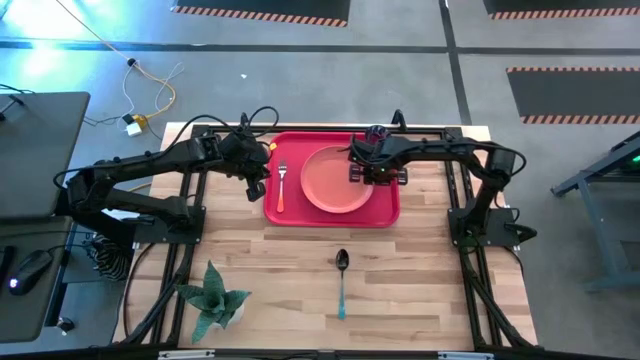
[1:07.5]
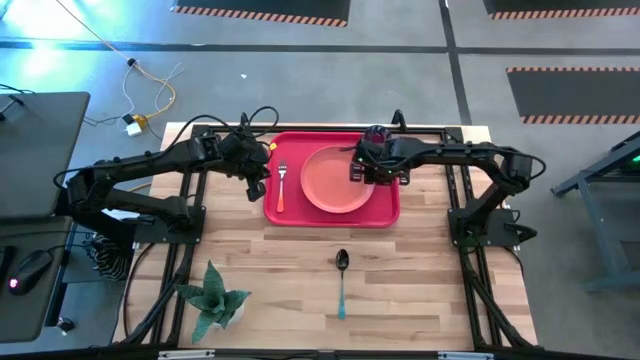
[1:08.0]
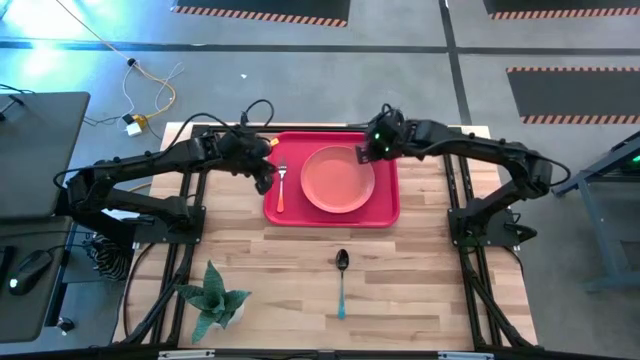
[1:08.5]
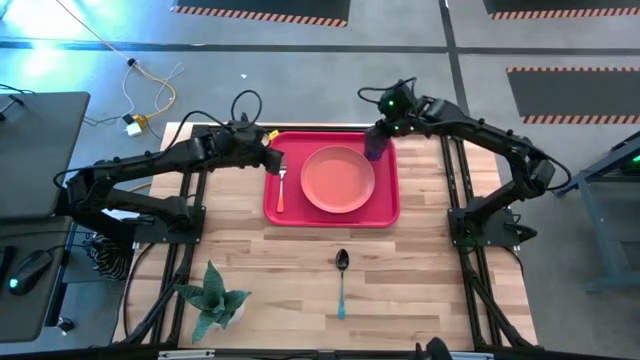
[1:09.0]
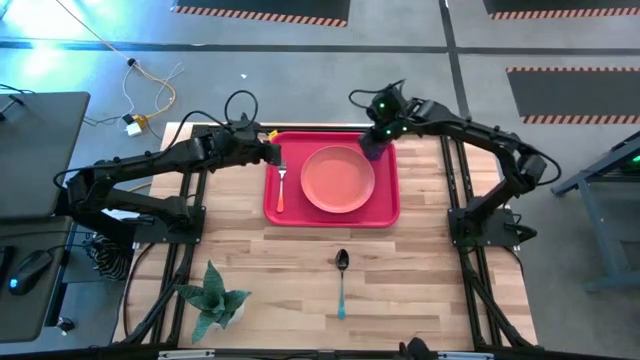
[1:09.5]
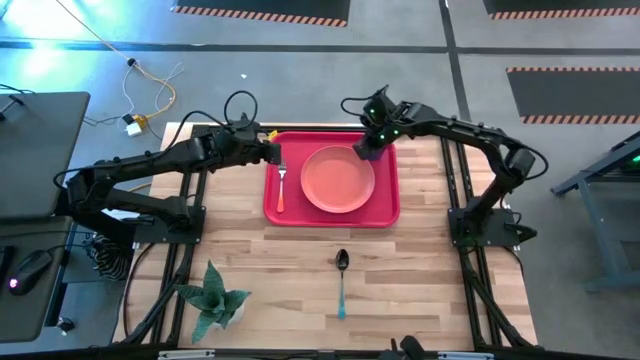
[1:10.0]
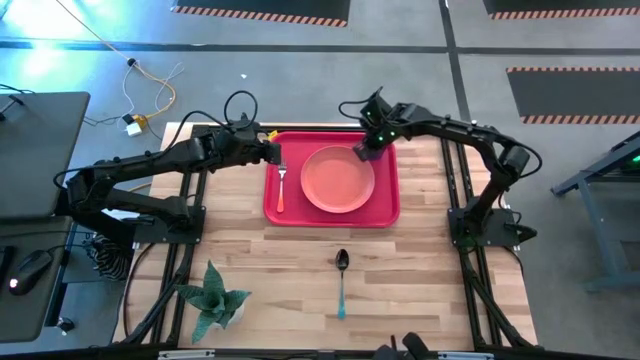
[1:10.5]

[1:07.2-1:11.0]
Task: Pick and place plate/cup/fork/spoon on tray
Adjust the blue glass on the red serving tray

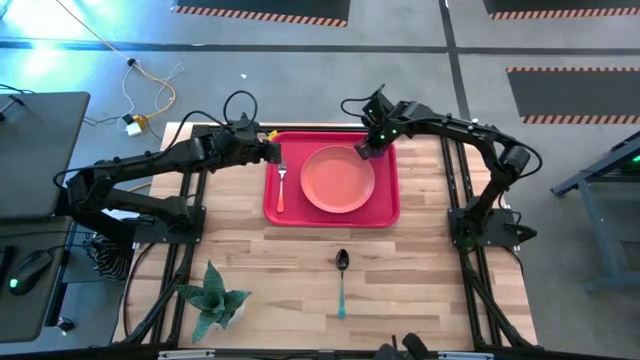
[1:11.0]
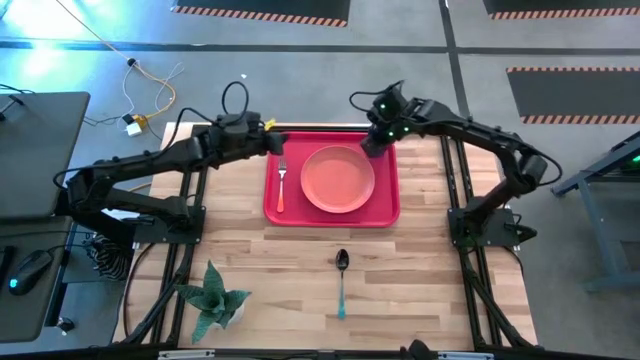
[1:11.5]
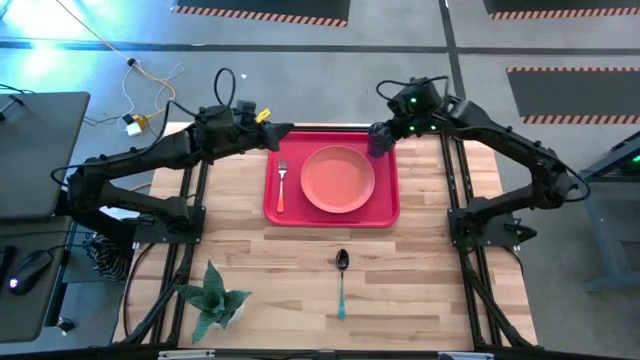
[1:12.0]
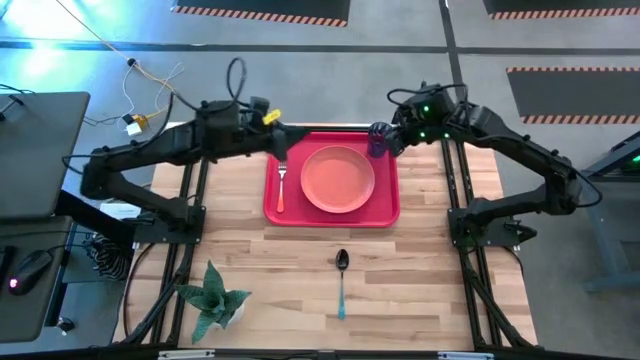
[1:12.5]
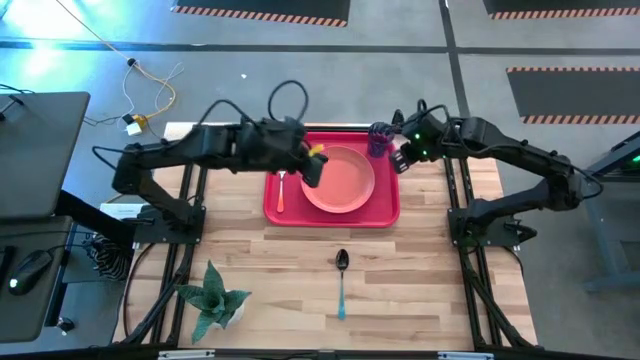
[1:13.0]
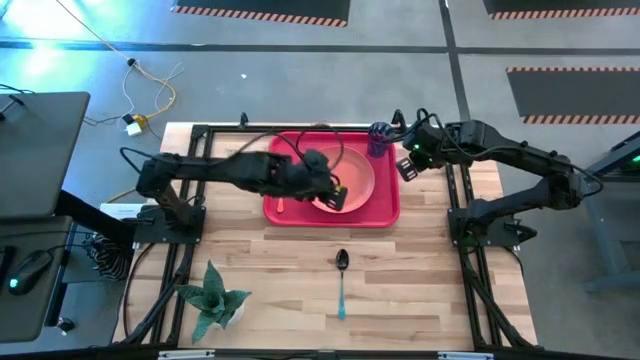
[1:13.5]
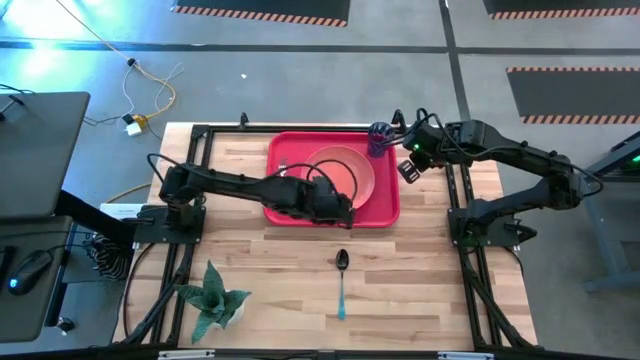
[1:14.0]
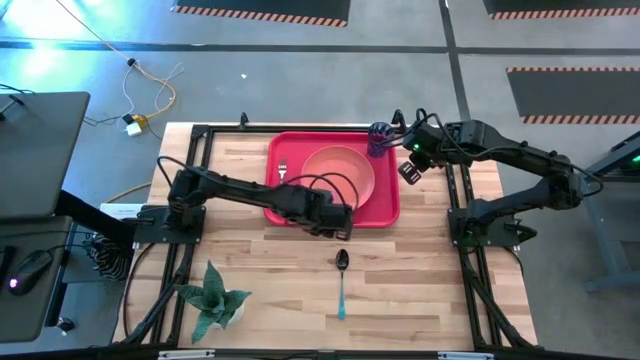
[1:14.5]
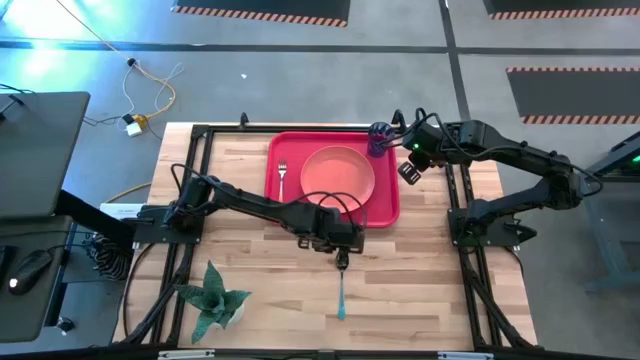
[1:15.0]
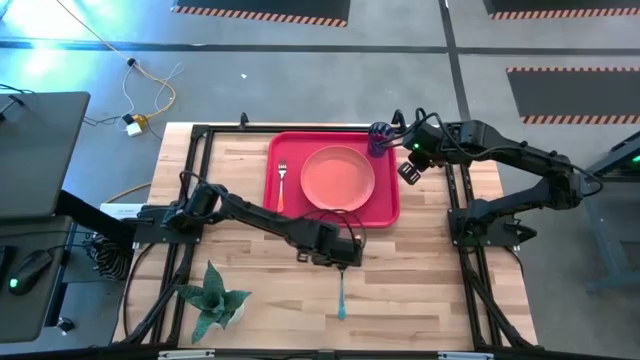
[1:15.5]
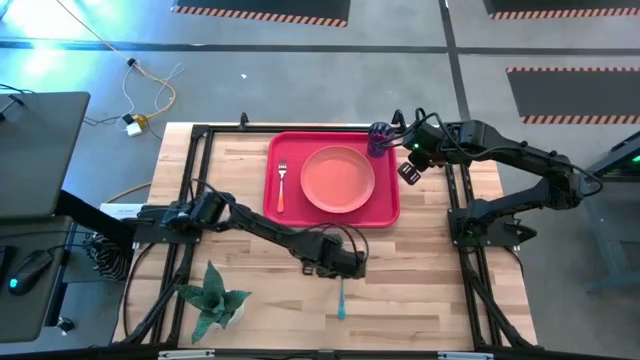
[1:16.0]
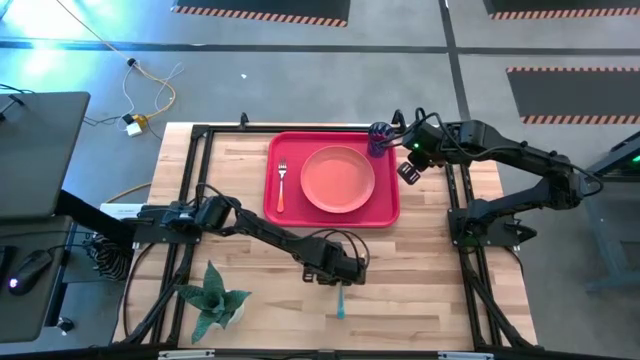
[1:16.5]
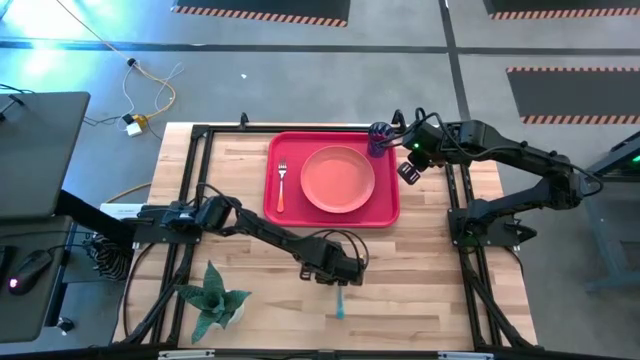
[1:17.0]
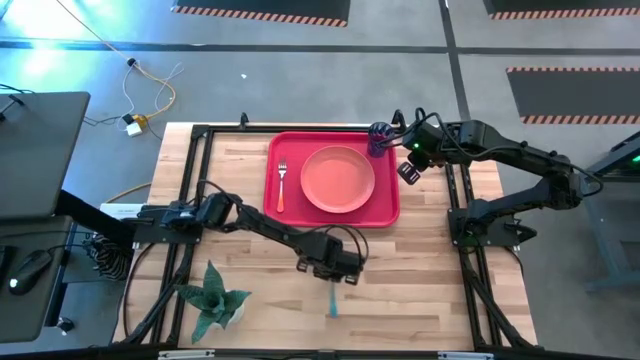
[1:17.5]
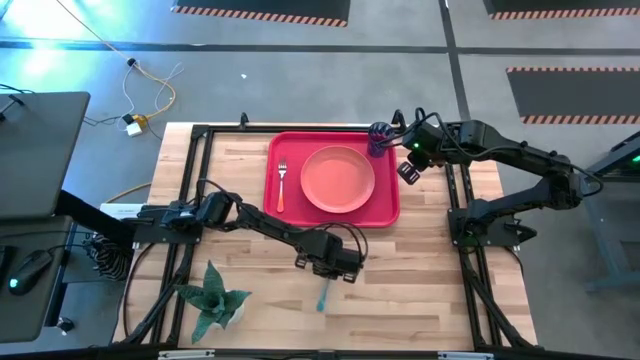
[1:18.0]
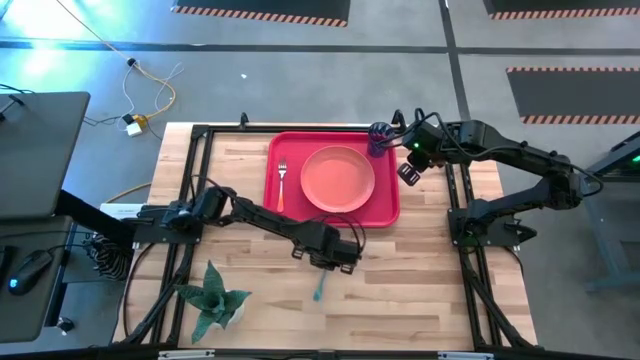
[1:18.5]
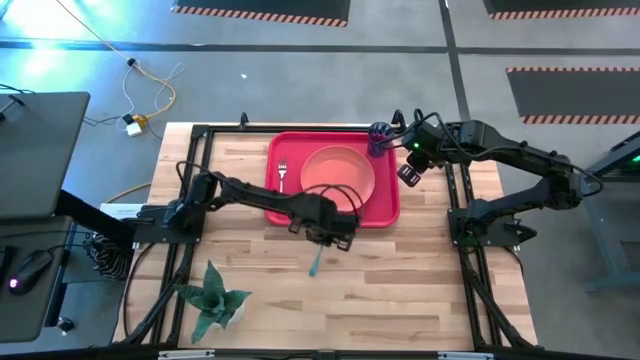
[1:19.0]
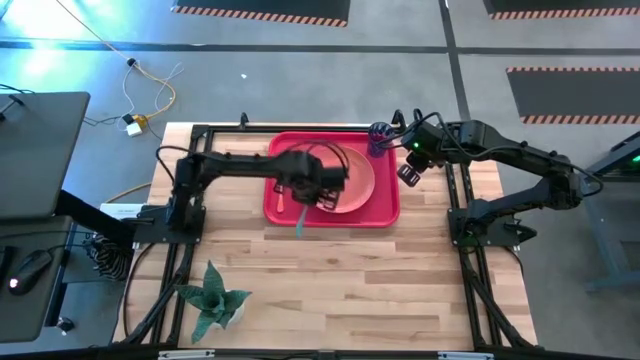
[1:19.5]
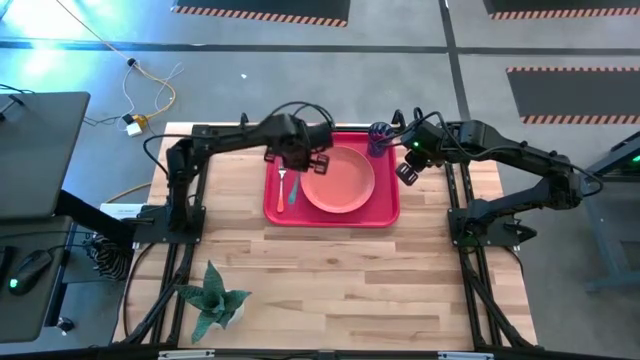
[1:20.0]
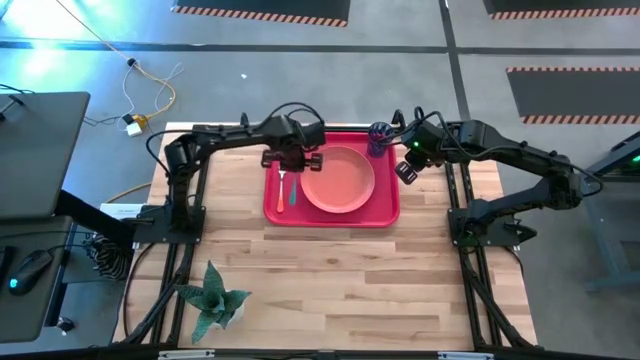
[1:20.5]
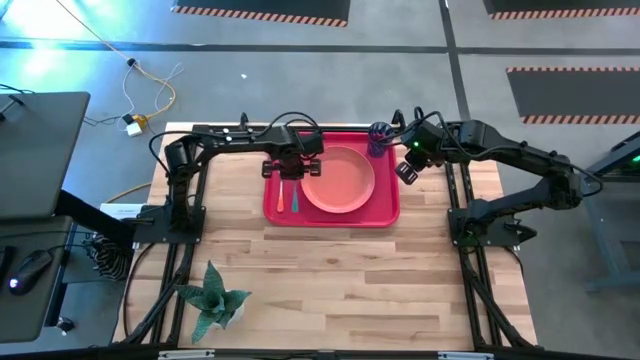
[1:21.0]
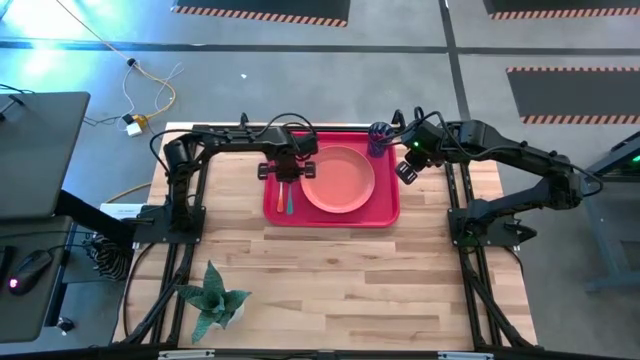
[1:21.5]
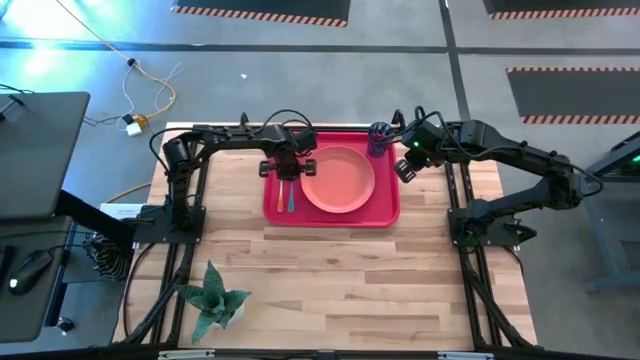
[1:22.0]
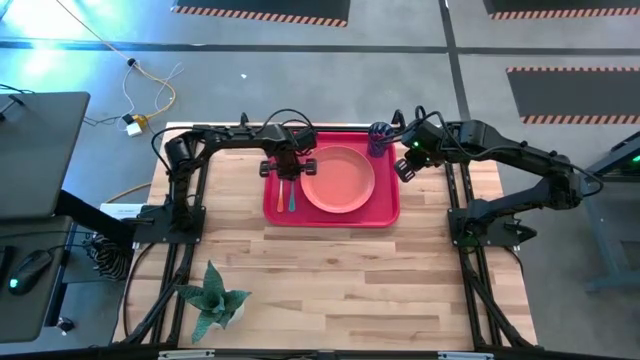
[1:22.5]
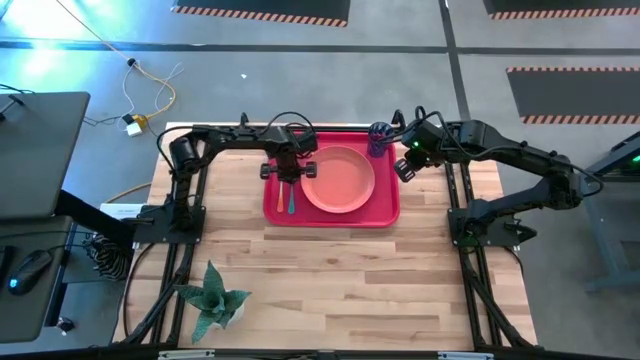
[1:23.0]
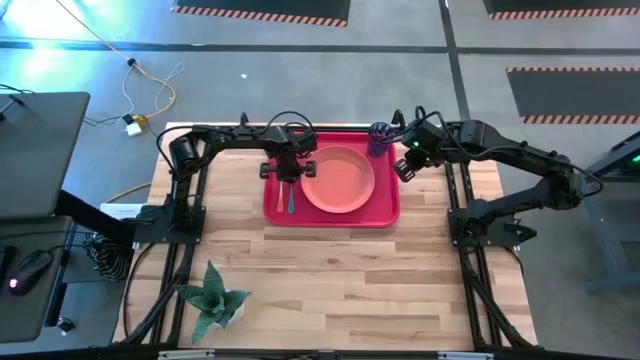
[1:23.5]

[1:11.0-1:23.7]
Put the blue spoon on the red serving tray to the left of the orange plate

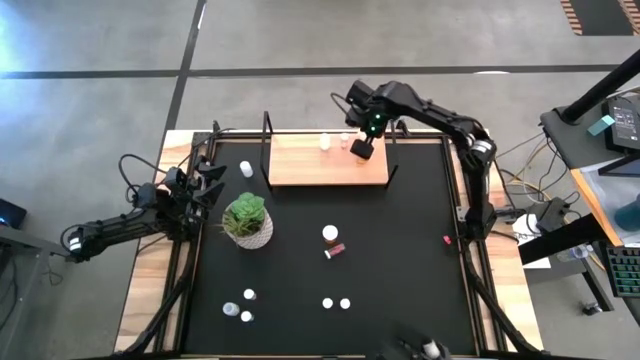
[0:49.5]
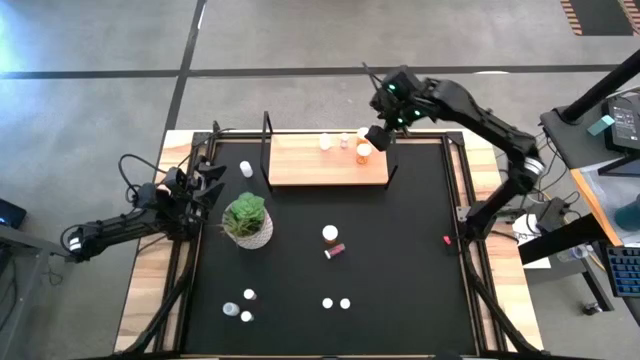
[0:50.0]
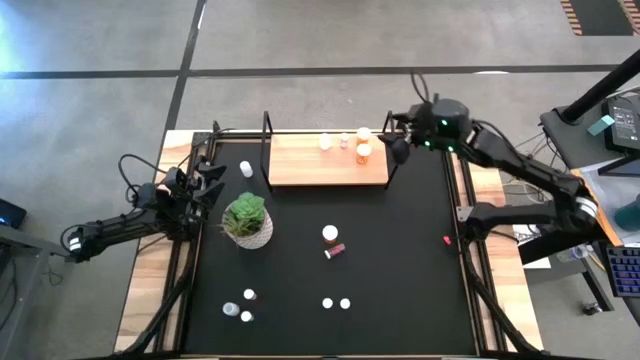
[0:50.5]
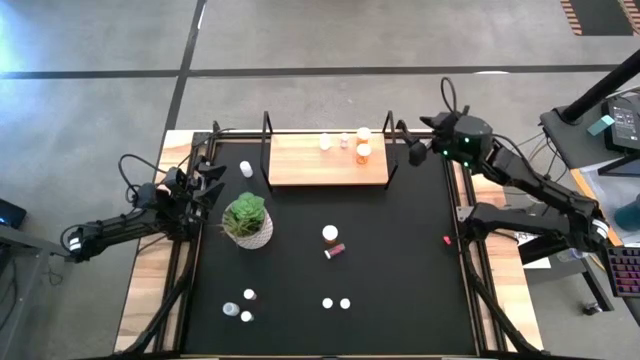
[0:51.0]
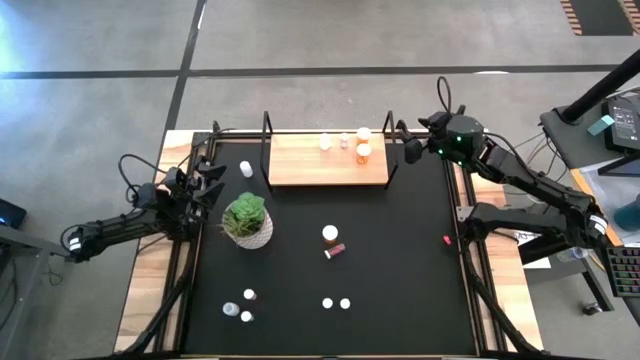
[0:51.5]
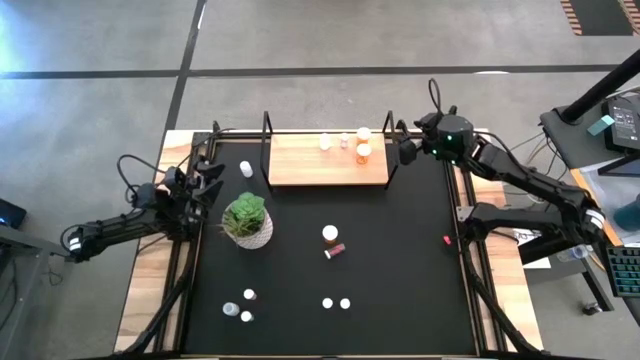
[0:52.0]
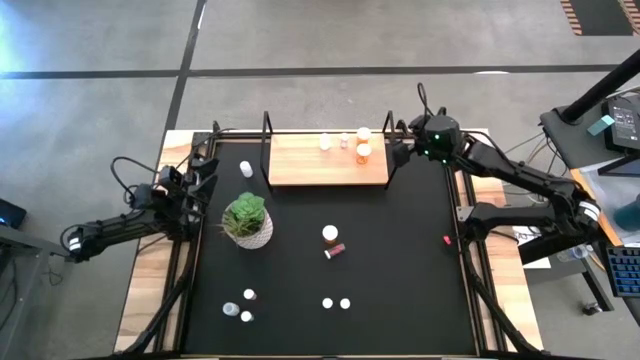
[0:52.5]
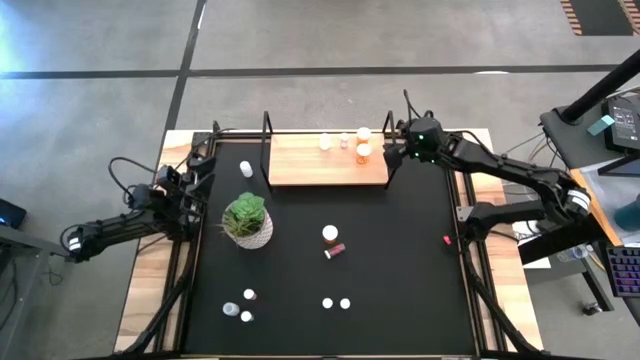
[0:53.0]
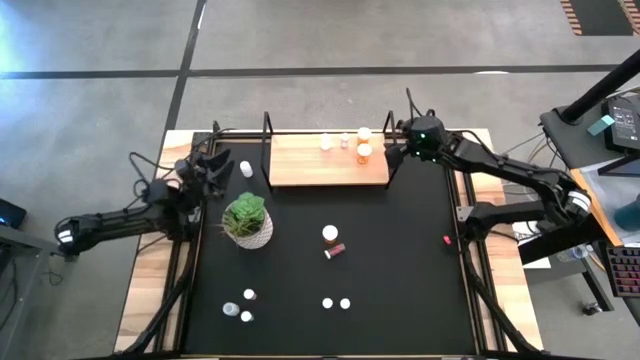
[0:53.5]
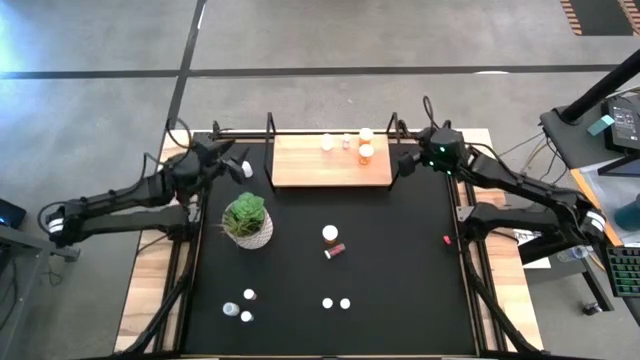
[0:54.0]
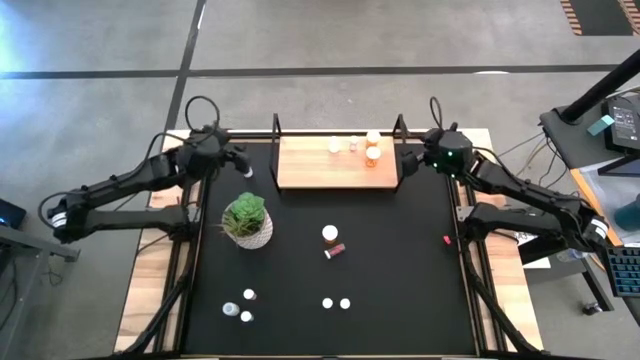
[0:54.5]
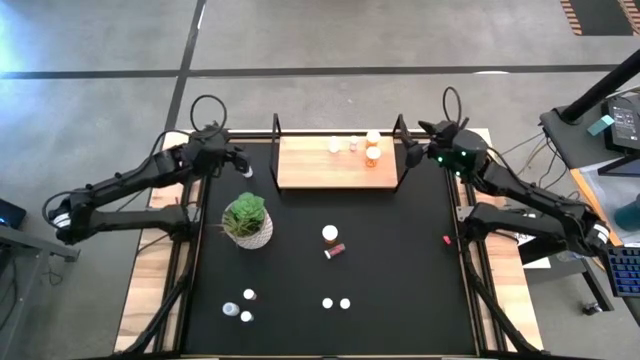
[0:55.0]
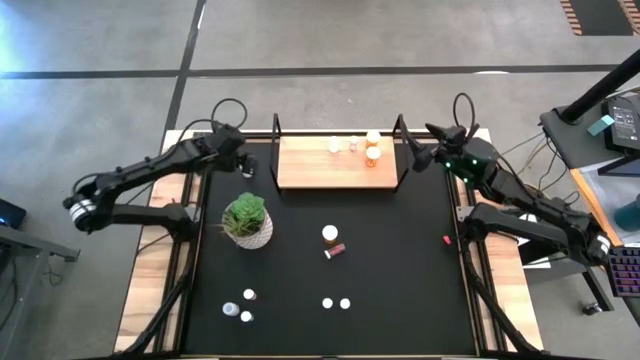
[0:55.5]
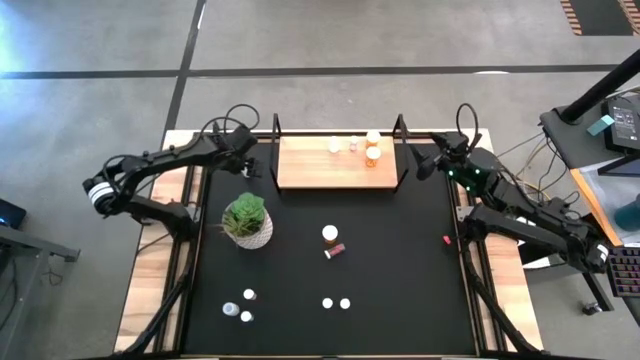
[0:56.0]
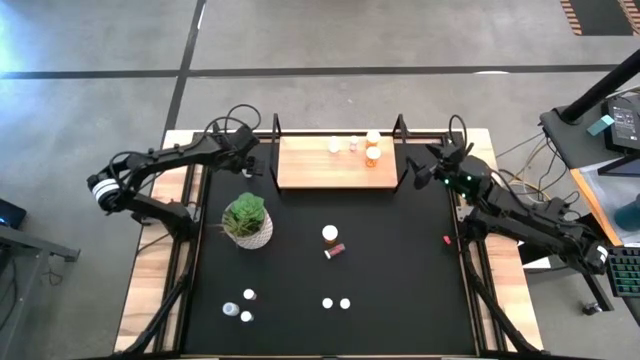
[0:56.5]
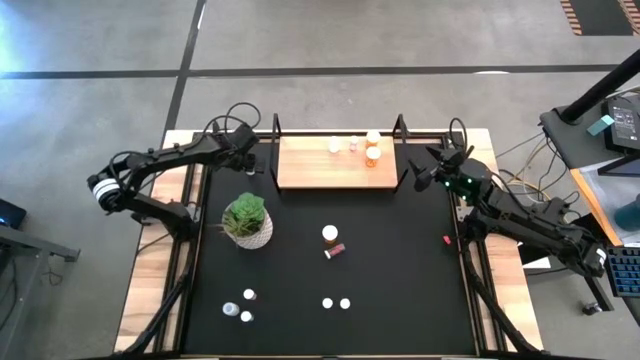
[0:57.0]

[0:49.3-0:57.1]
Task: Pick and place medicine bottles onto shelf by color
Put the top white pill bottle on the shelf aligned with the other white pill bottle
